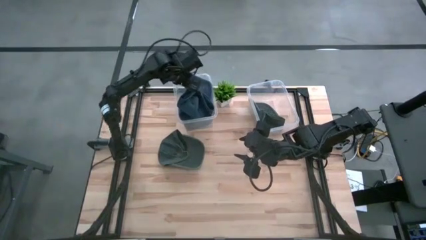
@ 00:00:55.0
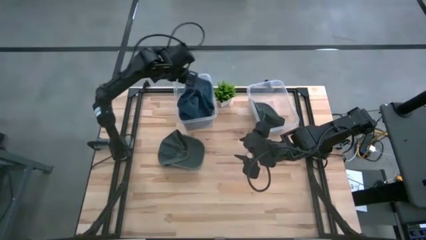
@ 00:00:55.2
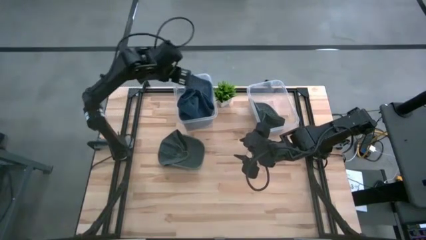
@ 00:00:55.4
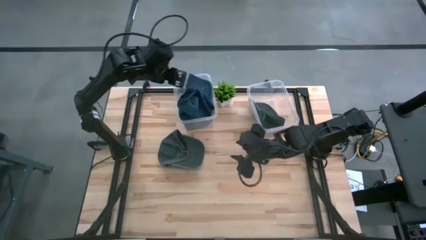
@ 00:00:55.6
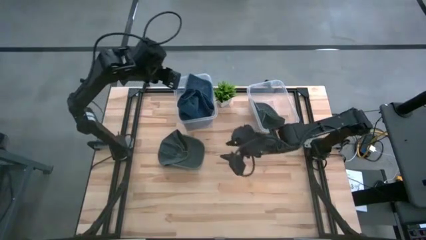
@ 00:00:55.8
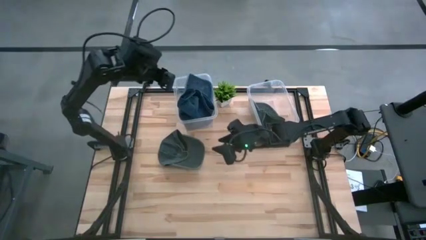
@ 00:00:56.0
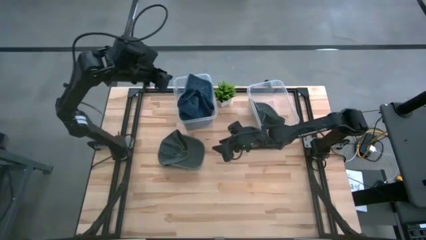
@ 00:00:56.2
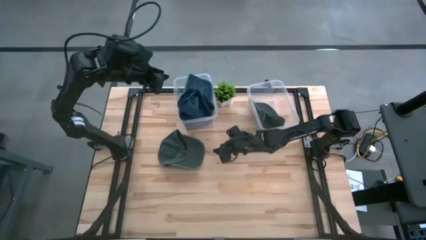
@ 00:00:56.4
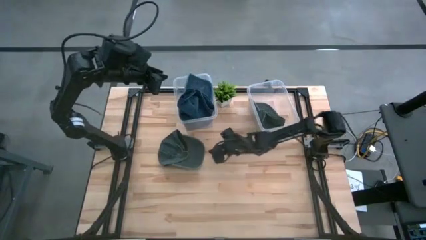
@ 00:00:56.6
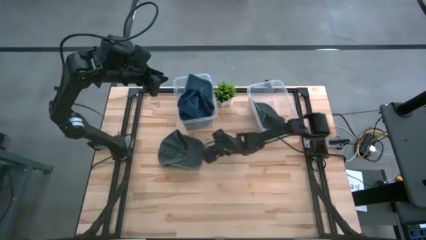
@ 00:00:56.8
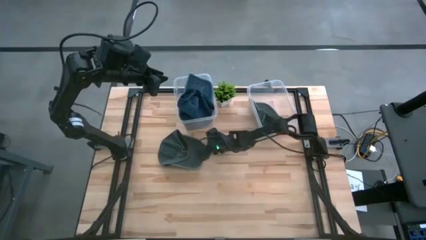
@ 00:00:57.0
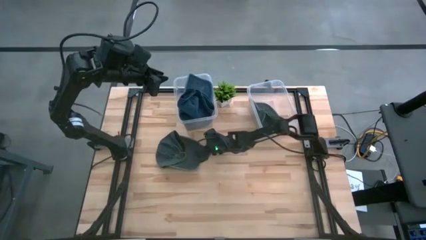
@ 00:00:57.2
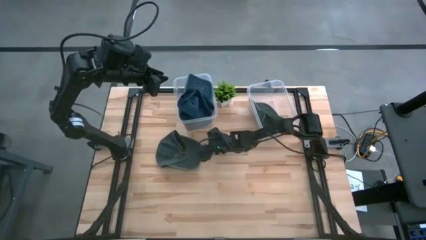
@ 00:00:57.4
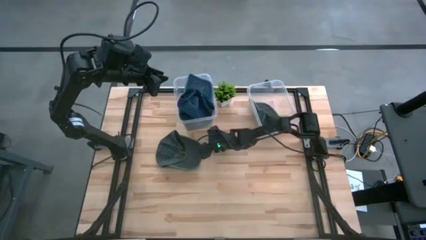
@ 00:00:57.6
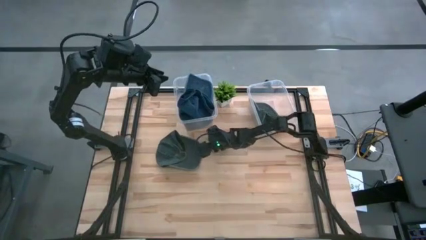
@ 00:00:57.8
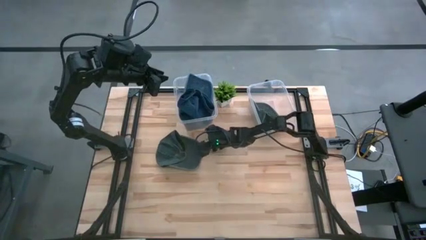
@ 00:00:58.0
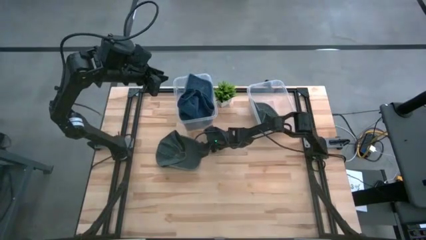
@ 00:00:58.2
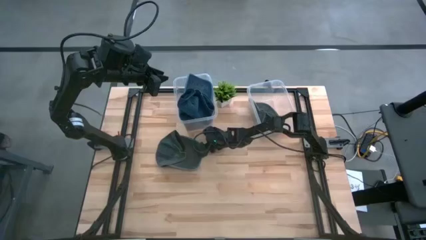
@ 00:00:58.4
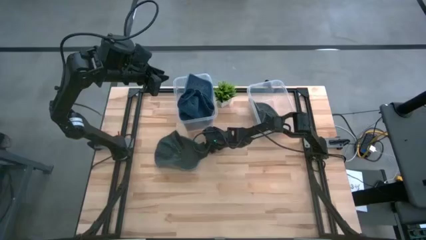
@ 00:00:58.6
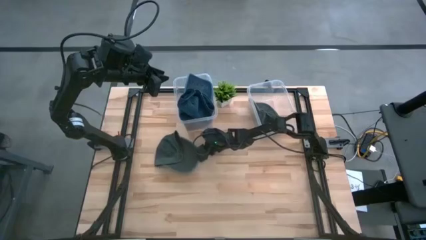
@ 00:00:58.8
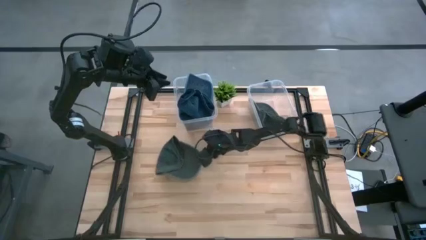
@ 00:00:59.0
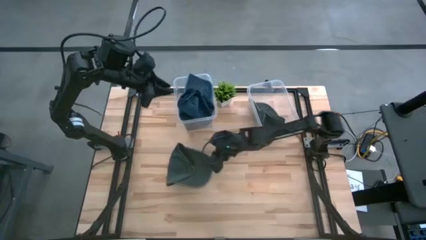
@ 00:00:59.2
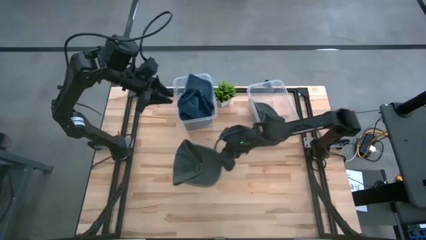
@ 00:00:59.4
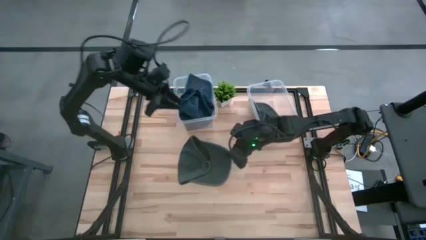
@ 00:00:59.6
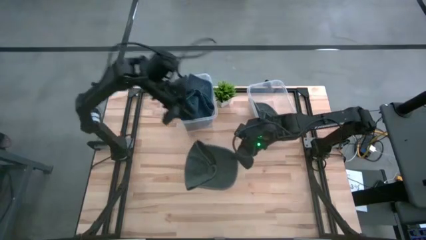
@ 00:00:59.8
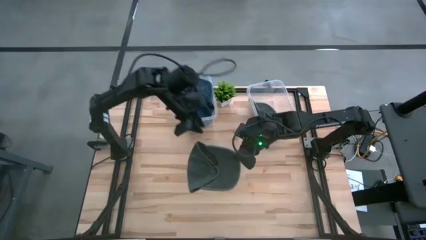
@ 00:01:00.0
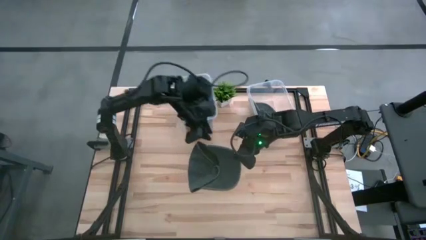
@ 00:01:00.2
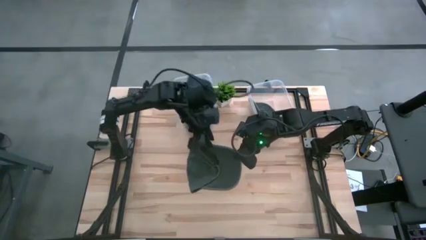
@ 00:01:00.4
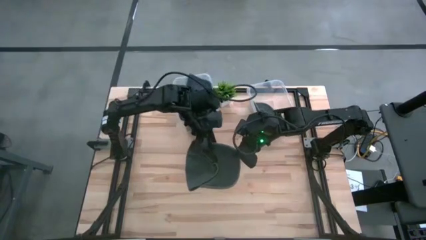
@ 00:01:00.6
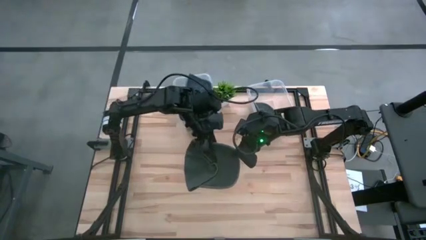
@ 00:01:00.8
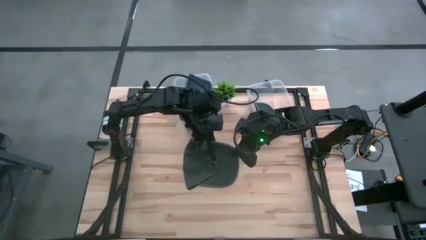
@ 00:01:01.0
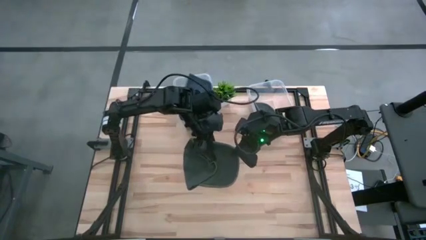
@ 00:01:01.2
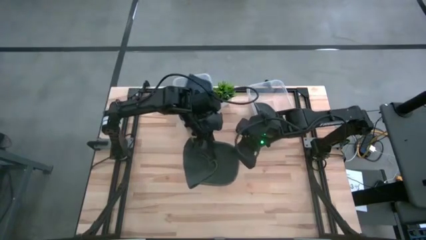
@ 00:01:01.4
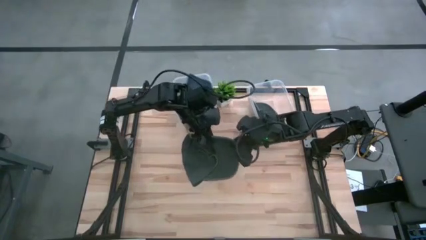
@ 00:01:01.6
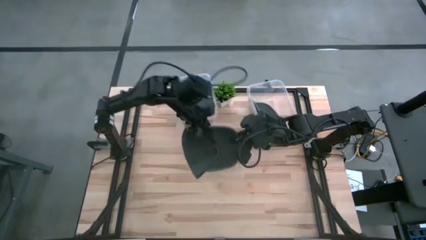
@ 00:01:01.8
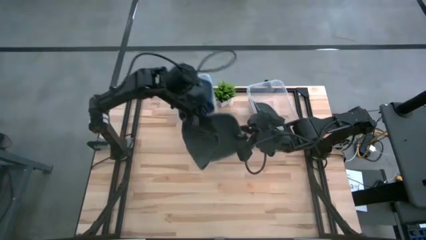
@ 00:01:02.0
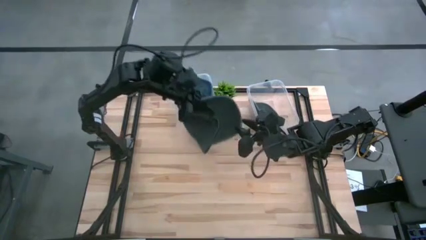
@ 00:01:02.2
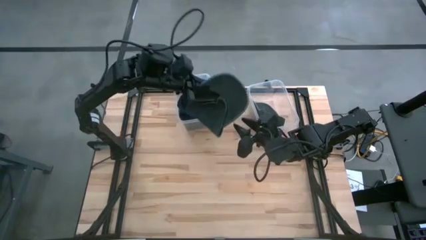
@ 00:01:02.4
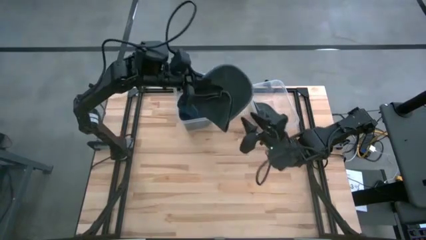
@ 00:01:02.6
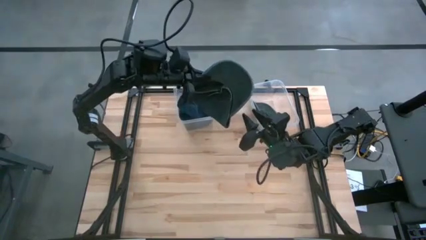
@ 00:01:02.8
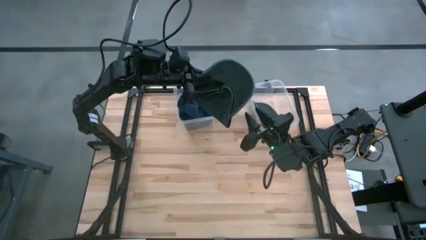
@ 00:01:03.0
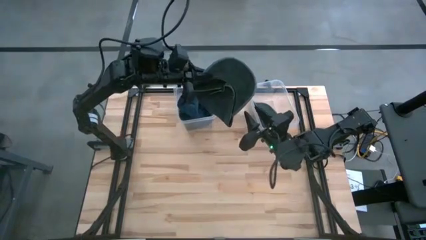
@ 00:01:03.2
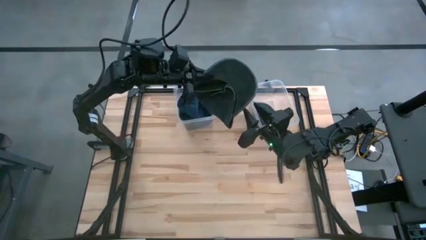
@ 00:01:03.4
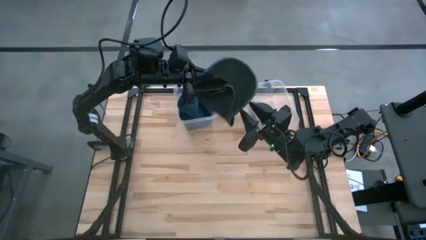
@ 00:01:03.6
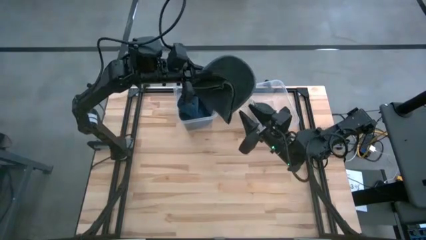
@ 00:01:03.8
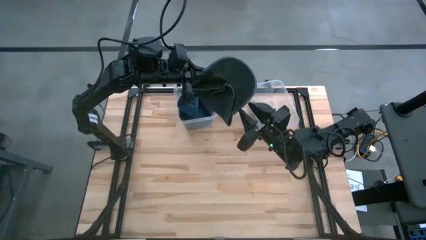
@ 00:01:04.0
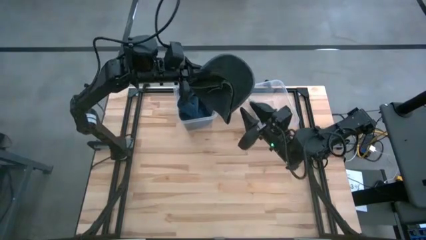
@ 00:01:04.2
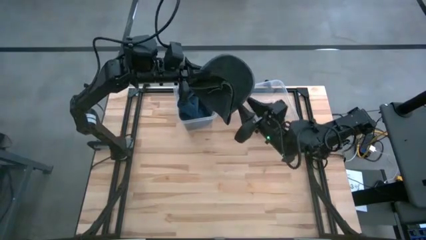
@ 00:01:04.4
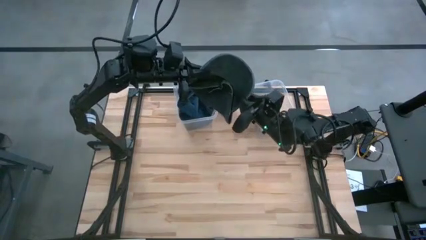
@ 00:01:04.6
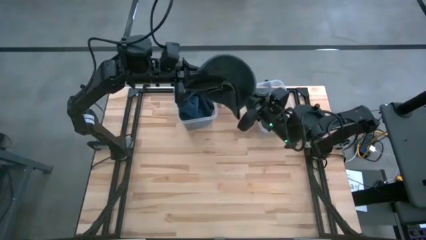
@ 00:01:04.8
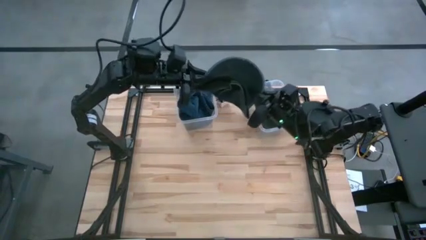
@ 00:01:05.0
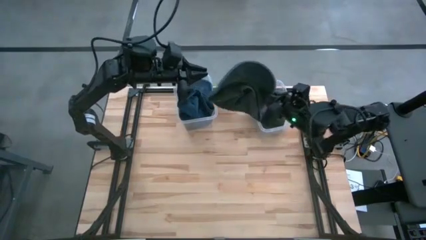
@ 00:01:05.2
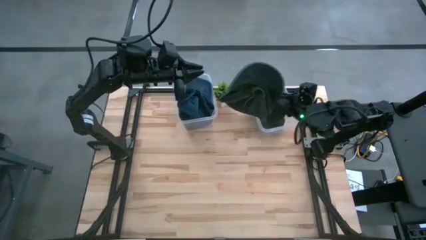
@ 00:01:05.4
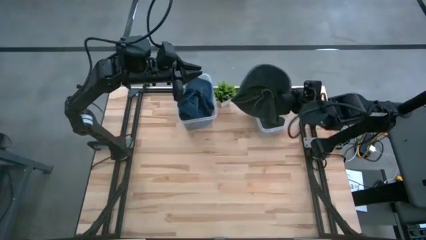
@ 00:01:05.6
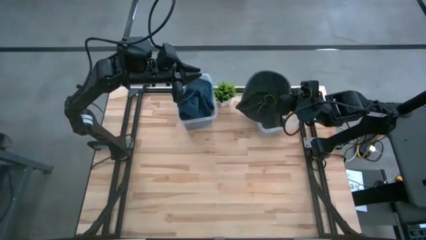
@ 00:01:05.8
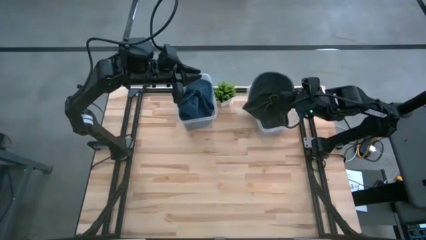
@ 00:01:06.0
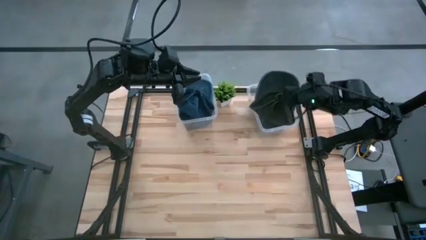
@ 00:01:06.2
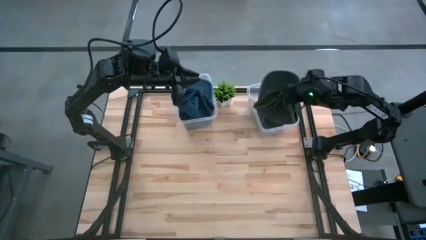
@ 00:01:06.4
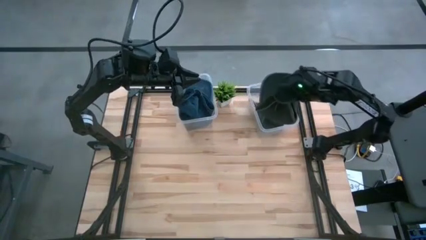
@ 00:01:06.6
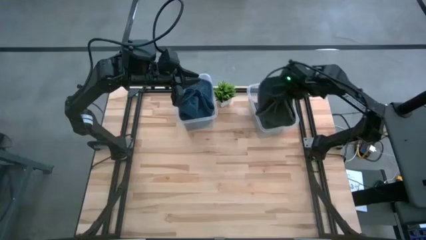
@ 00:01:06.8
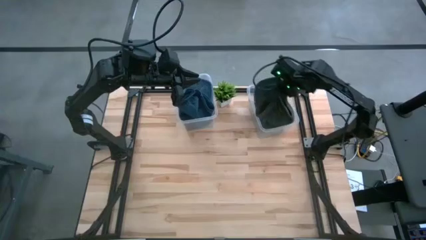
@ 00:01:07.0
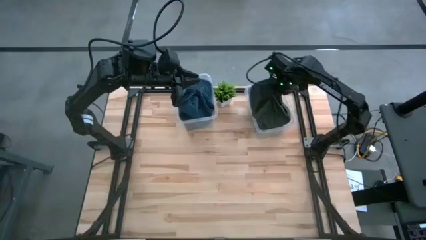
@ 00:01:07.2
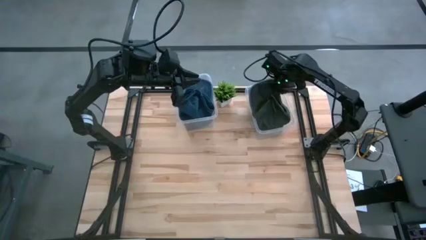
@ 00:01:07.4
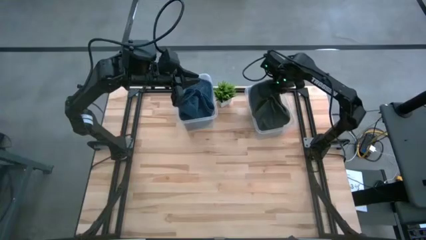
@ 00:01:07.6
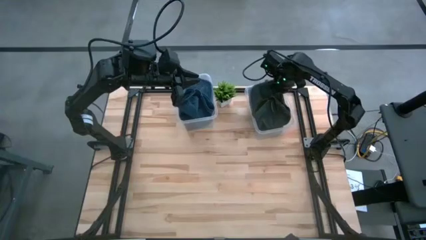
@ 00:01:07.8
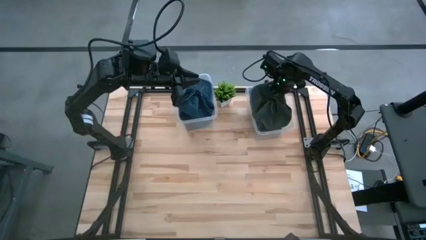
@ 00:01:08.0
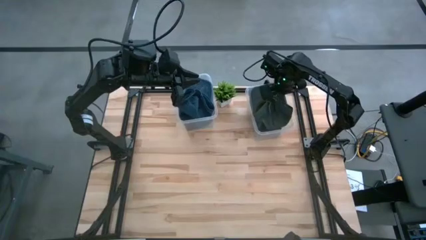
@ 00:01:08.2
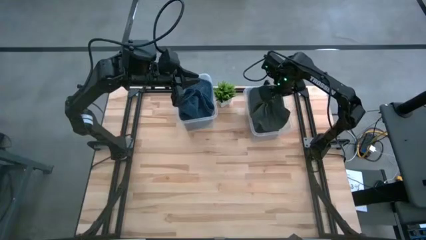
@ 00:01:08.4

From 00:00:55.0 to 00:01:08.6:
Task: Pick & Place hat
Put the gray cap into the right transparent bin

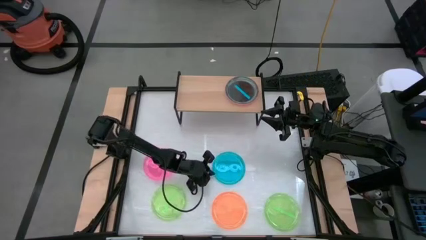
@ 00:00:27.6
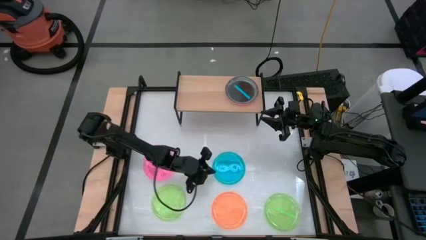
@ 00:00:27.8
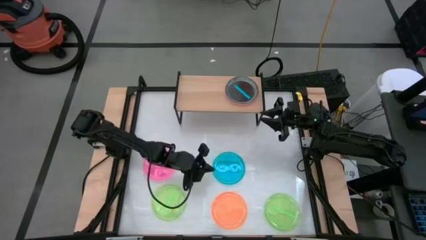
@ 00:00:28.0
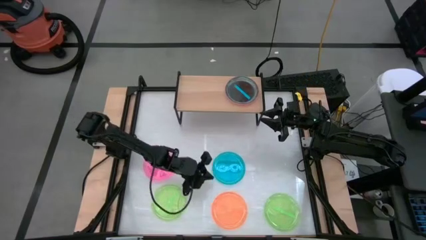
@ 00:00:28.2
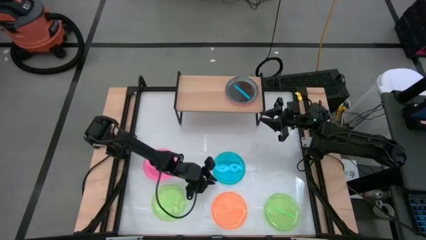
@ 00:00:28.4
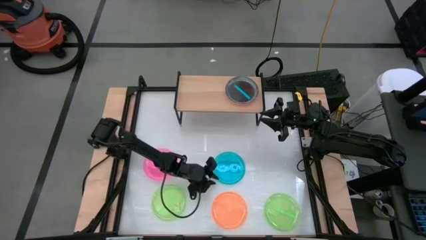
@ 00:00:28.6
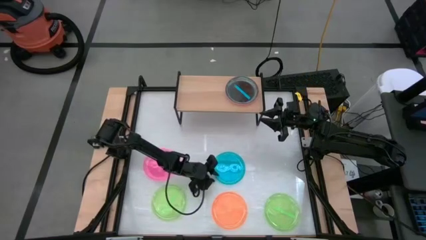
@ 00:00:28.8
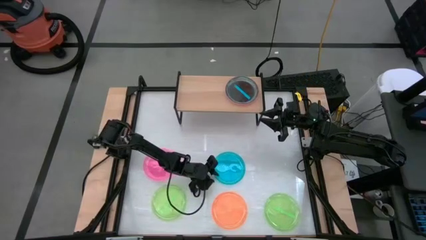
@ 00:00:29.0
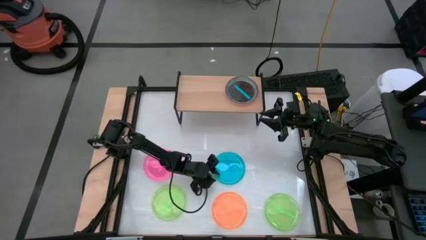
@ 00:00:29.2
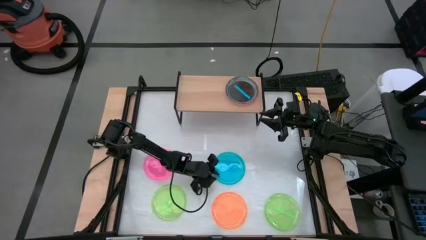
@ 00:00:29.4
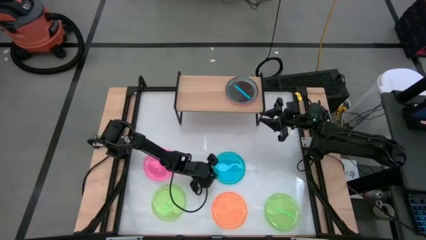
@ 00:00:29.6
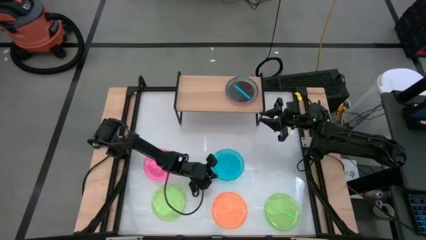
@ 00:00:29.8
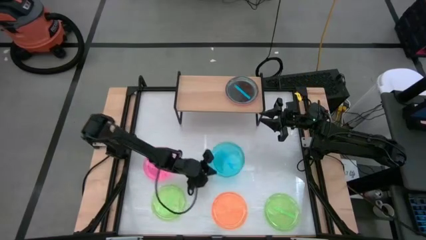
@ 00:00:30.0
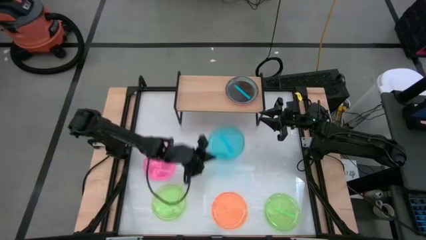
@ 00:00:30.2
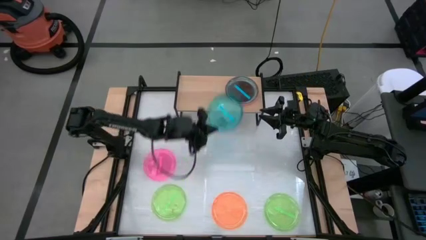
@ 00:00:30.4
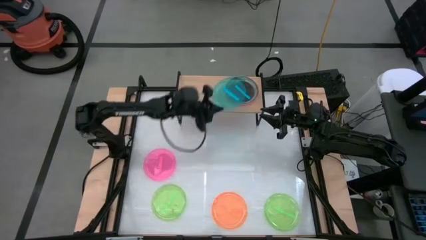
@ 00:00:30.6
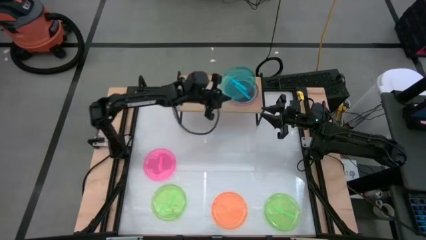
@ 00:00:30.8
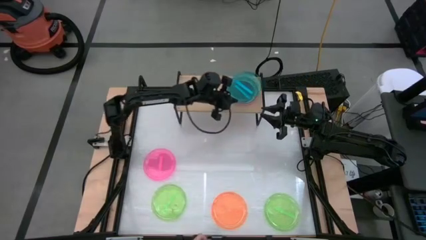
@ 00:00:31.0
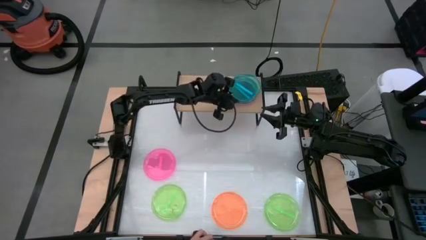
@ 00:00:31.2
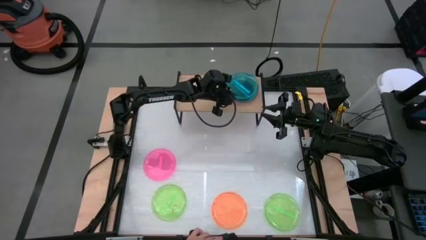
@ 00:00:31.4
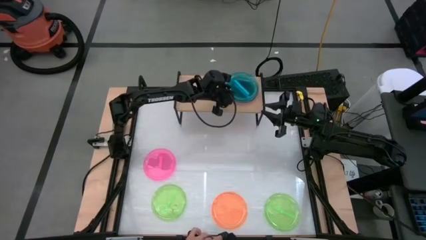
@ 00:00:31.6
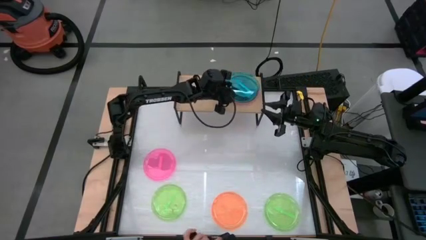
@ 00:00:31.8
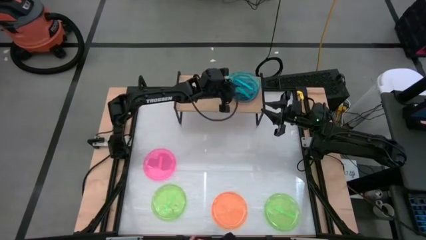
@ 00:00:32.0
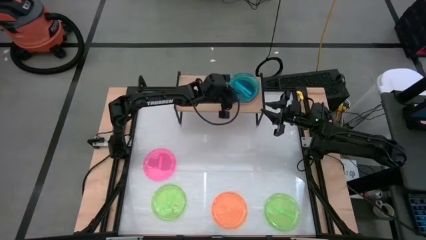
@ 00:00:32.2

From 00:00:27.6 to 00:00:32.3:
Task: Place and stack plates onto a shelf
Stack the blue plate on top of the blue plate on the shelf
